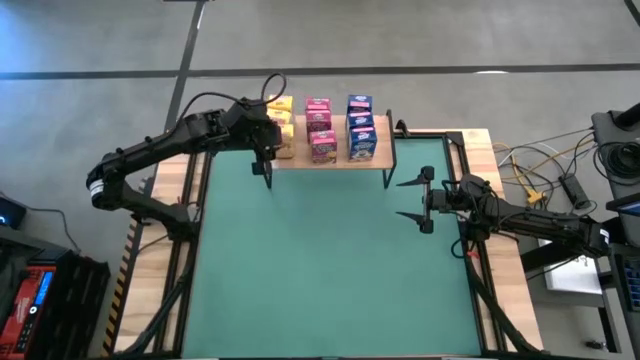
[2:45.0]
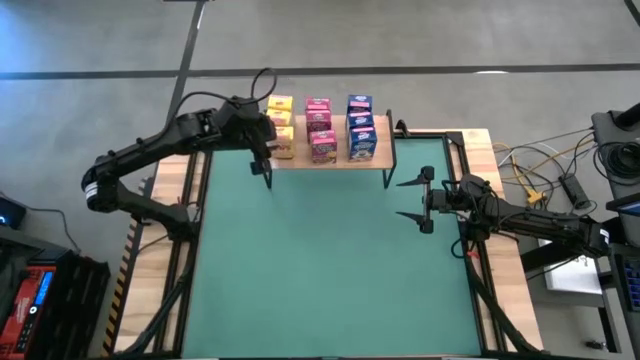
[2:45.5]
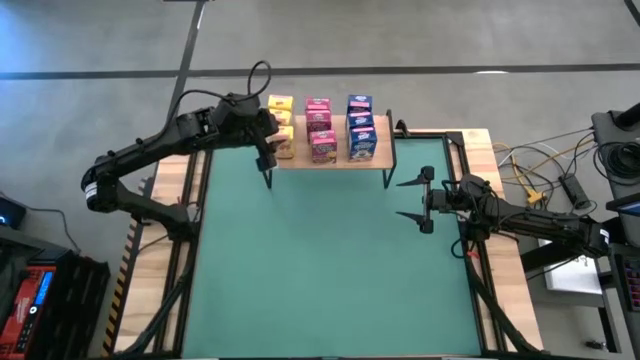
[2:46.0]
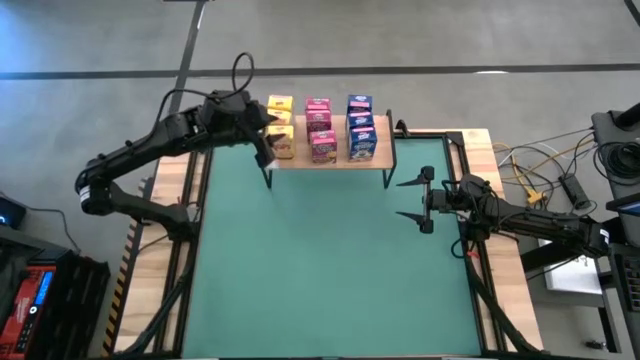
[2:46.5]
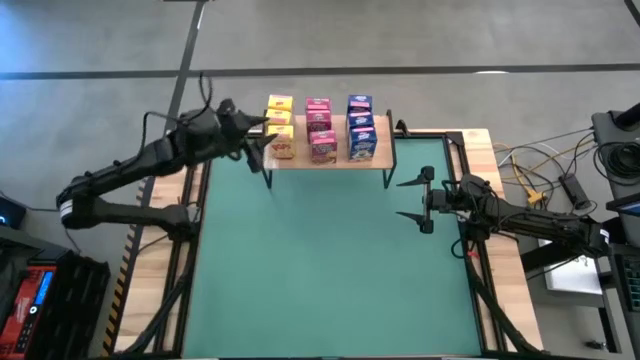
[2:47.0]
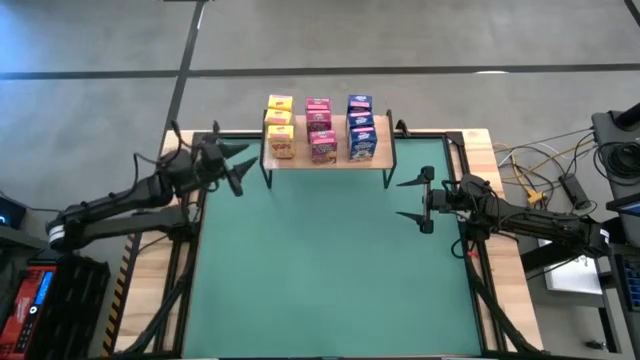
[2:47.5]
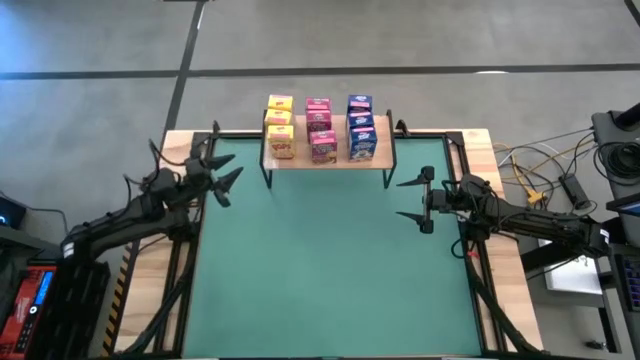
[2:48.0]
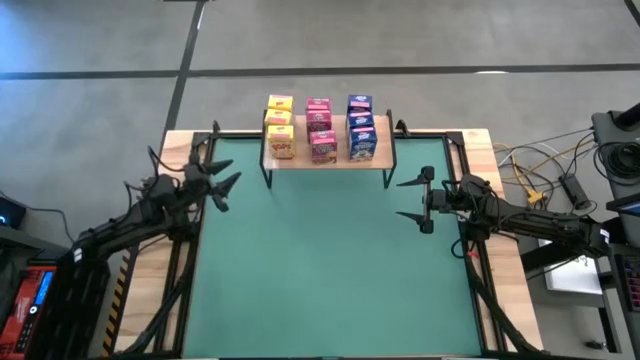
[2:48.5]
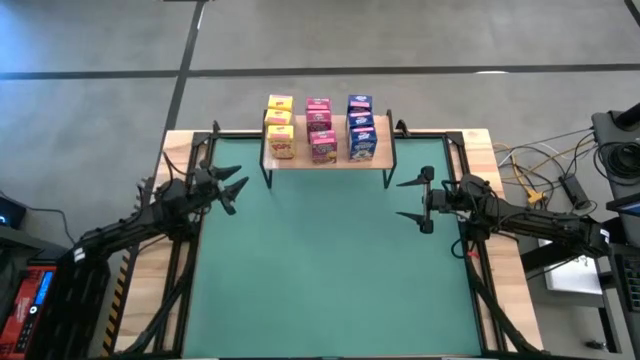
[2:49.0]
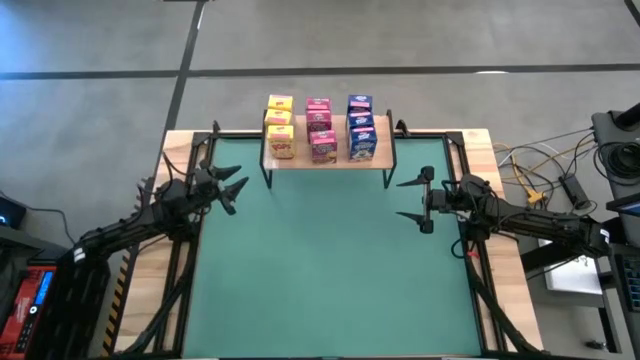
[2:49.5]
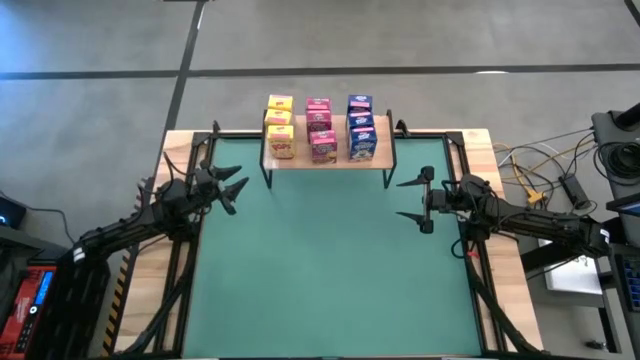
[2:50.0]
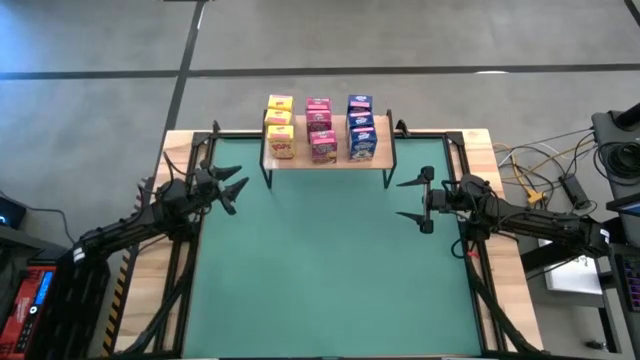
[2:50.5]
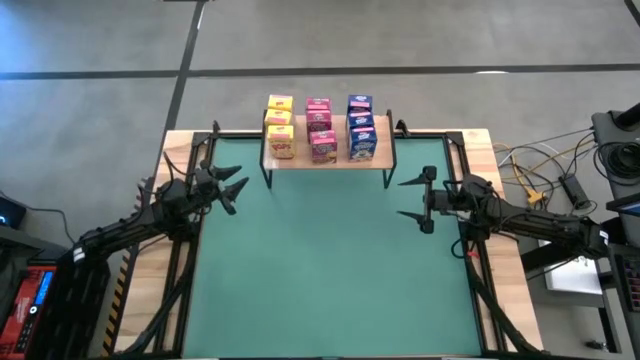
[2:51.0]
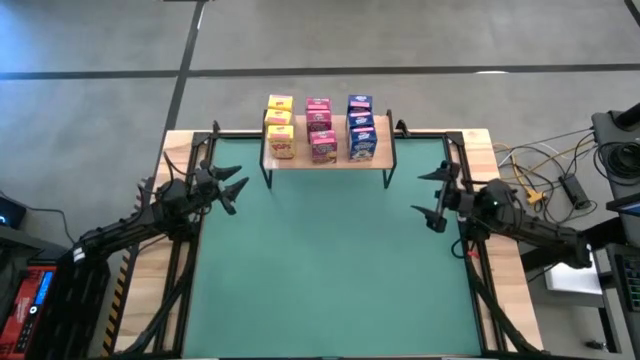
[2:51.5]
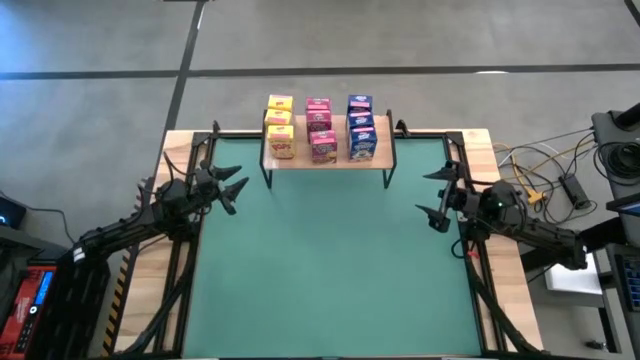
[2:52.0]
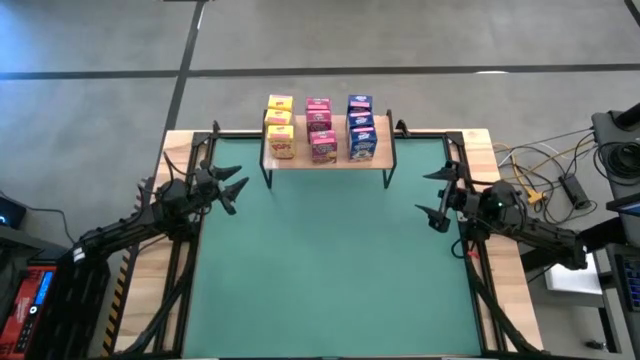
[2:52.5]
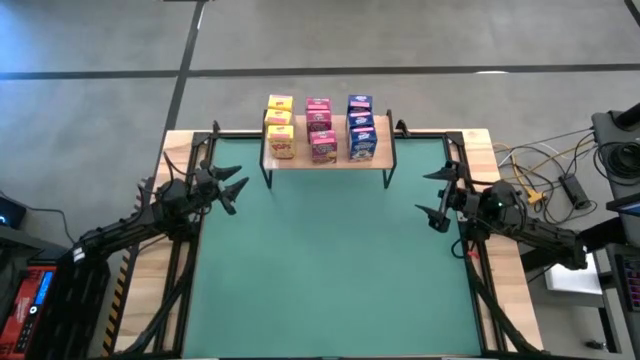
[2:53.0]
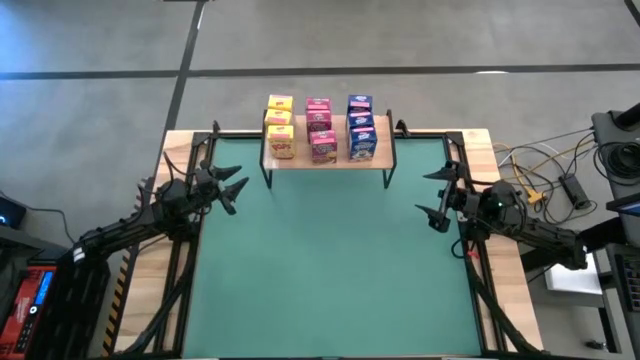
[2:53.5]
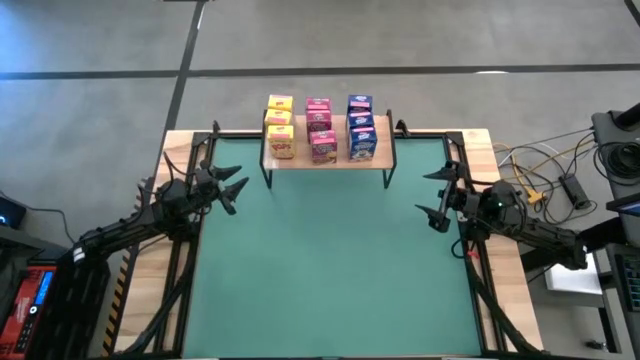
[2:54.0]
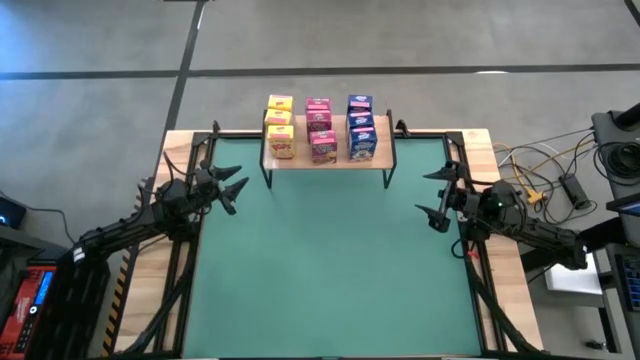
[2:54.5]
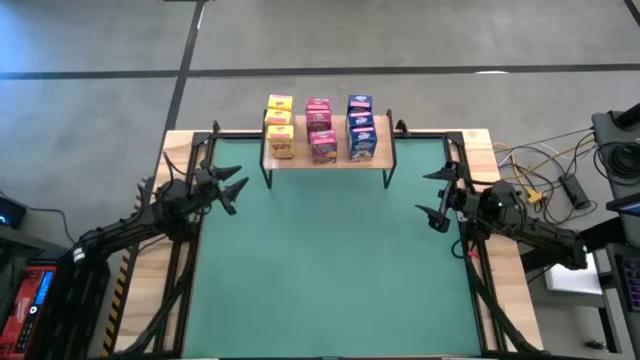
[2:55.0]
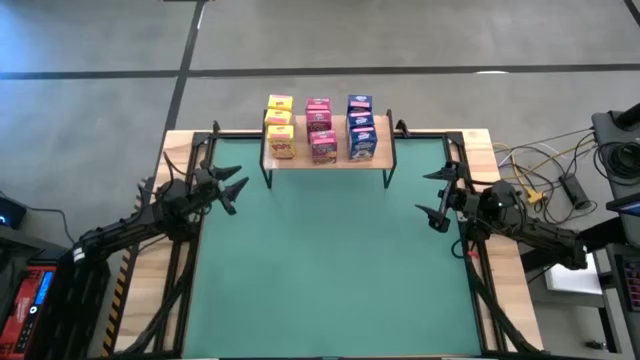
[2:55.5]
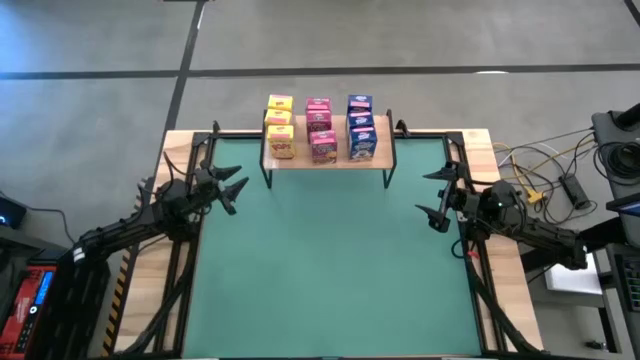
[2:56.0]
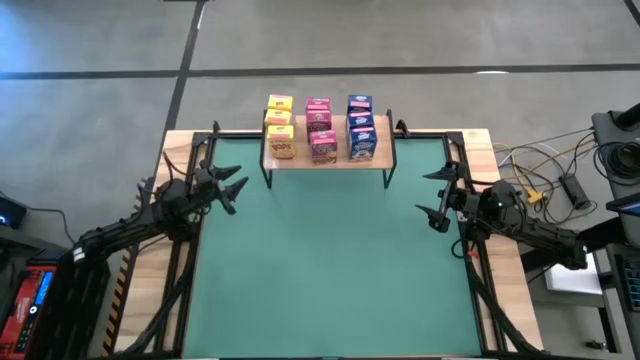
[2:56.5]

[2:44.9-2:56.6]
Task: Stack cereal on shelf
Return to Home Position

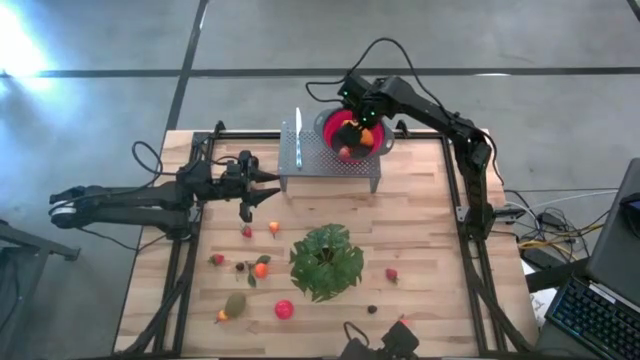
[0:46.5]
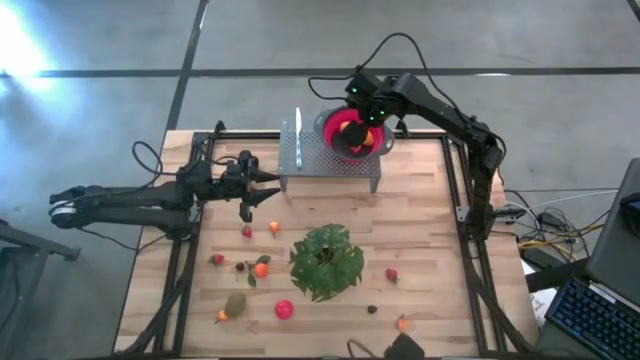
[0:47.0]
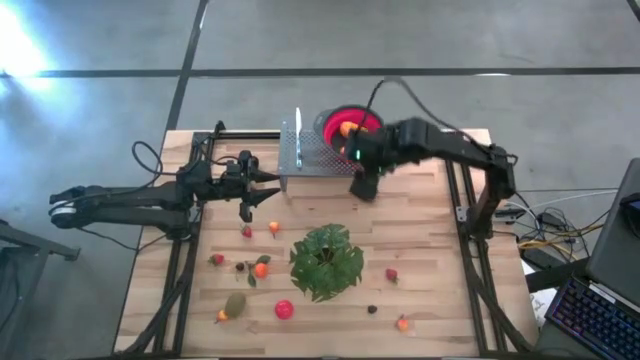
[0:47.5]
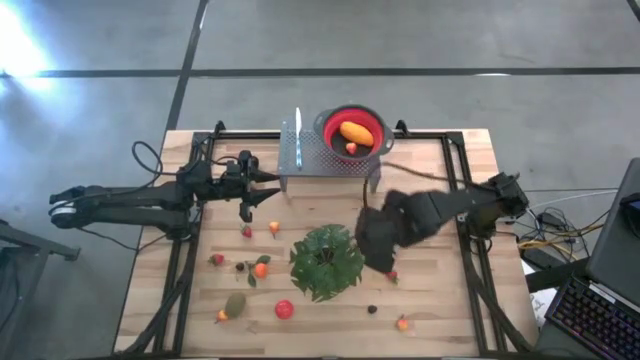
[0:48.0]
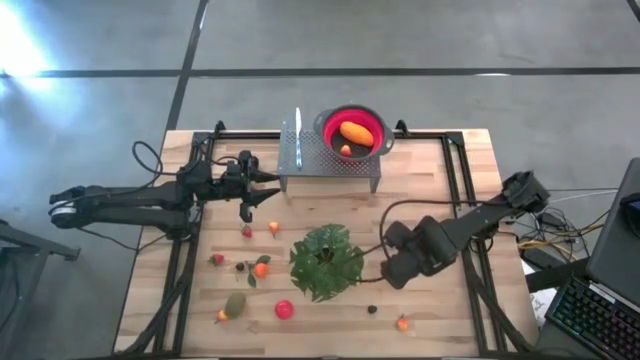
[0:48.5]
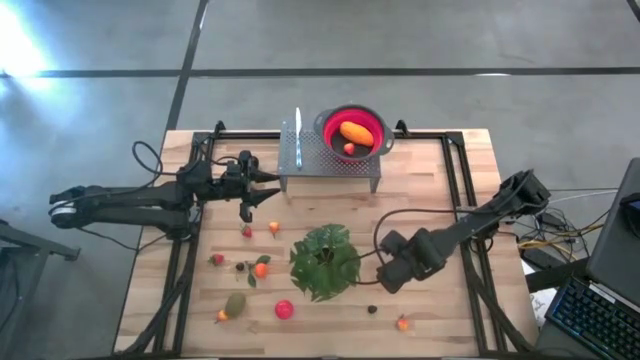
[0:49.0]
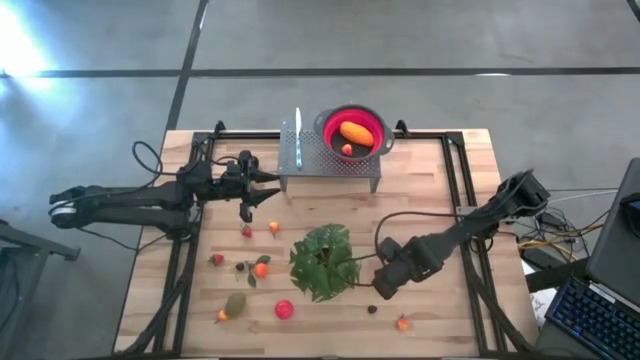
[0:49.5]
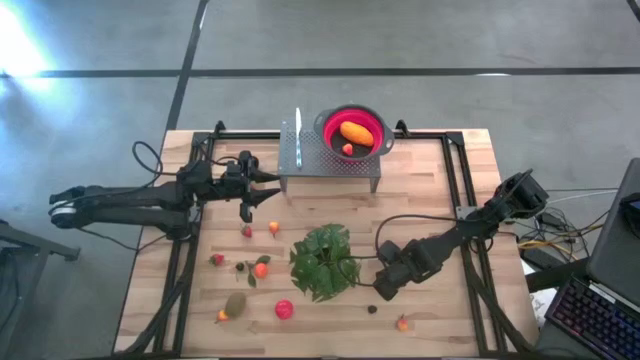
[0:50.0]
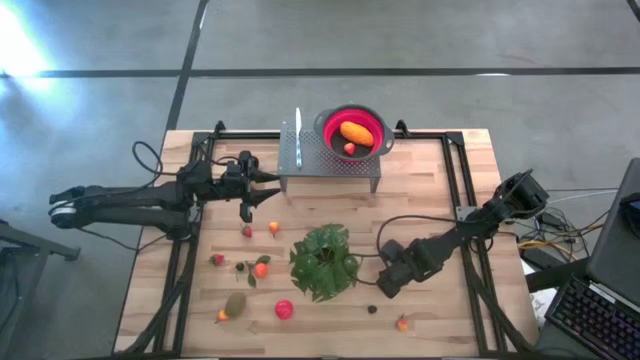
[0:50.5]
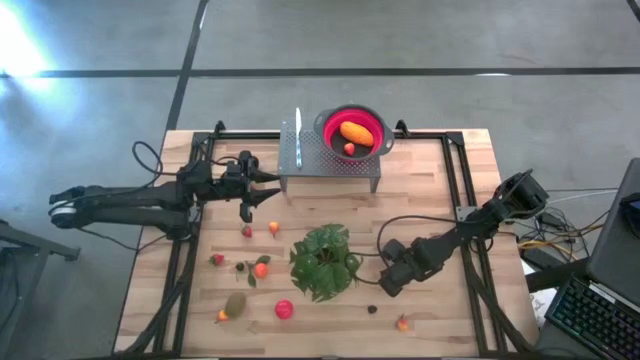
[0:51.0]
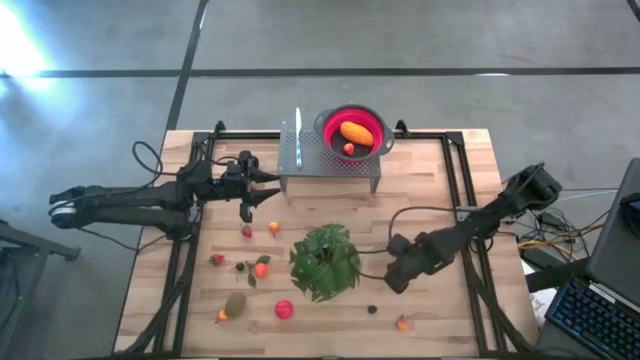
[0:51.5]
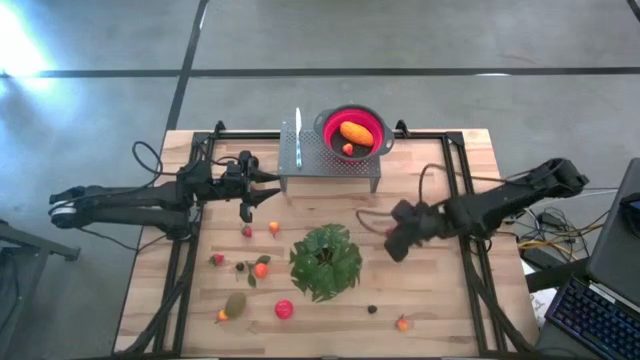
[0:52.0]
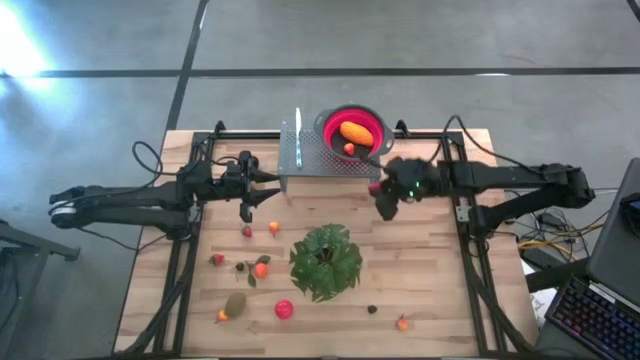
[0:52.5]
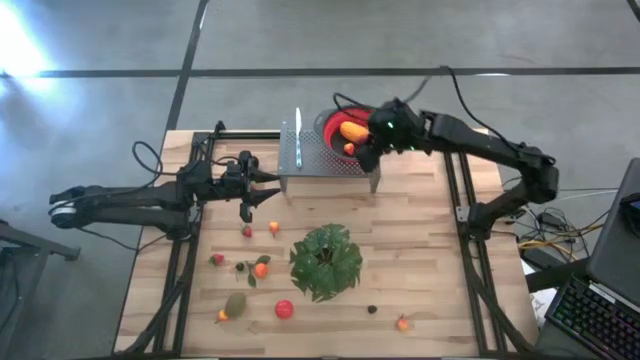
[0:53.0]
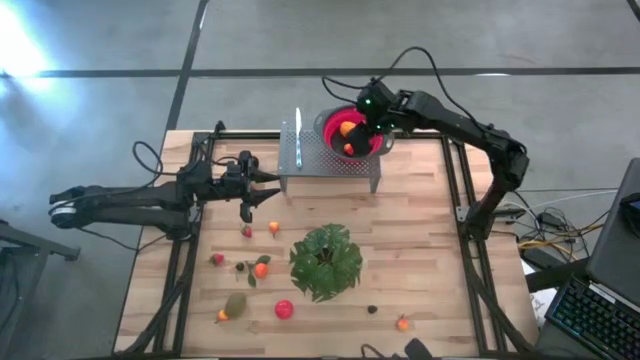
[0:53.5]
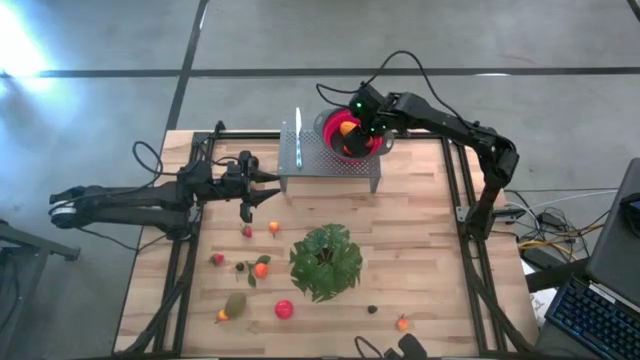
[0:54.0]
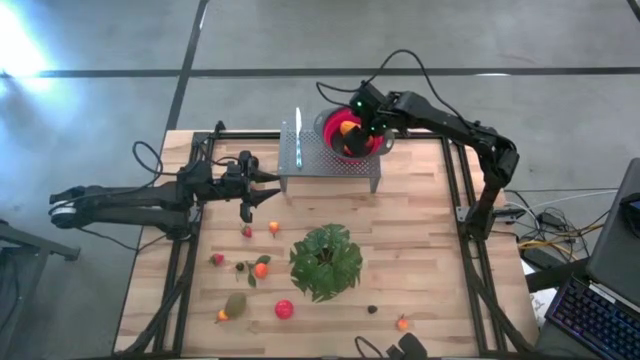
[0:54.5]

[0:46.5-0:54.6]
Task: Pick & Place Fruit
Put the red strawberry into the red strainer bowl on the shelf

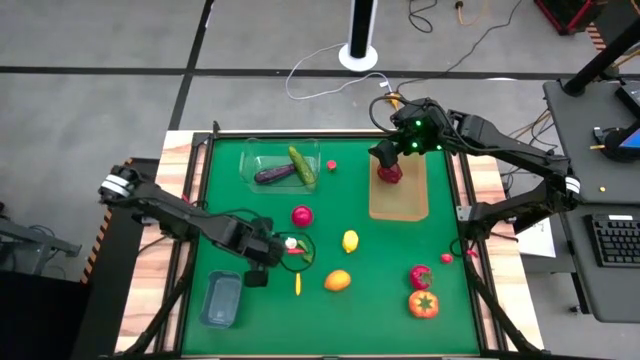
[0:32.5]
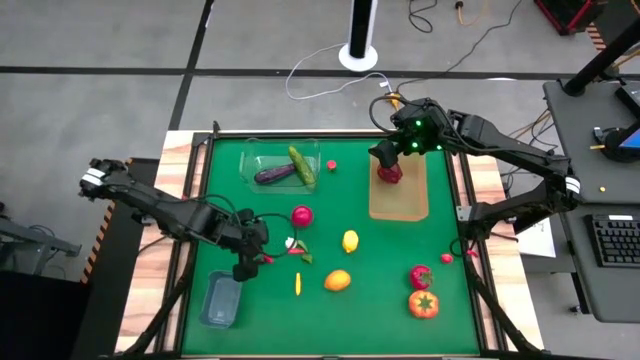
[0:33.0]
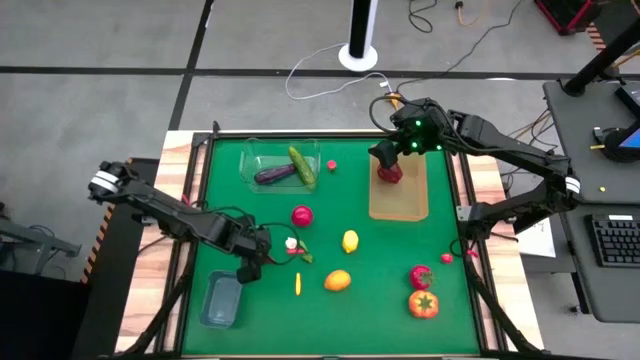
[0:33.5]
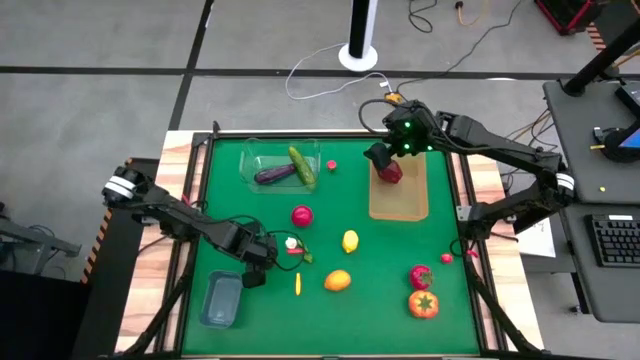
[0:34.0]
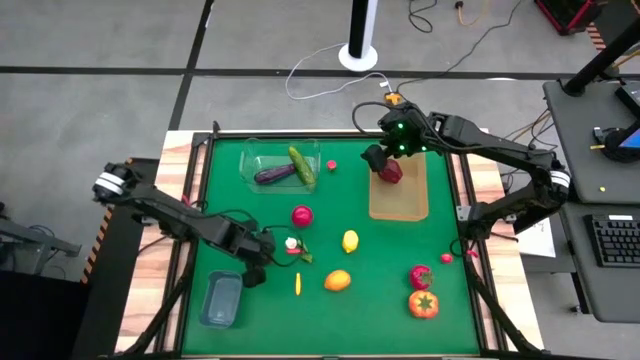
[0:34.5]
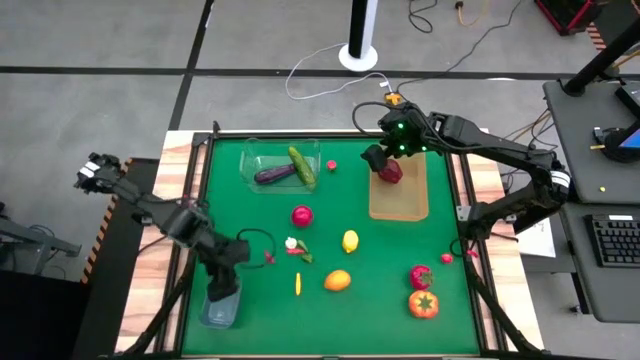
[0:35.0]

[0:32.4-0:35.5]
Task: Sort produce into baskets
Put the purple eggplant into the blue bin
